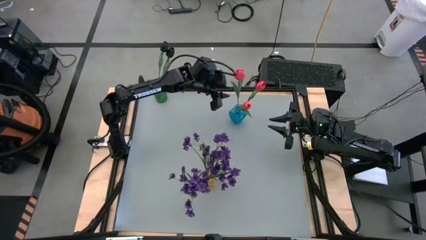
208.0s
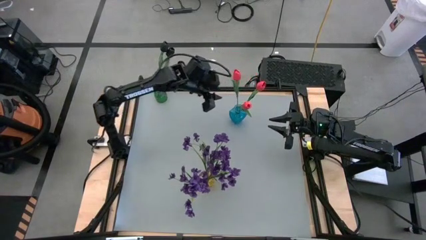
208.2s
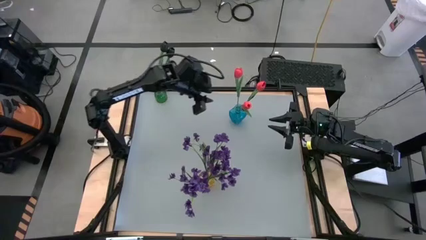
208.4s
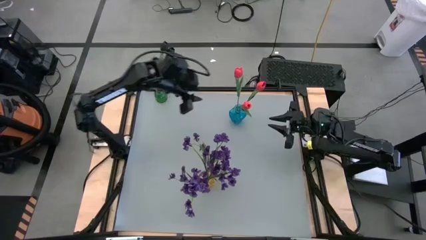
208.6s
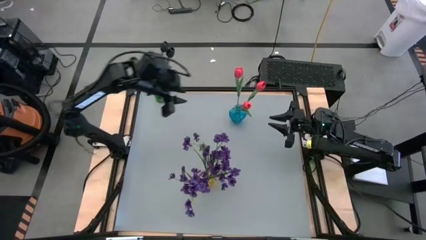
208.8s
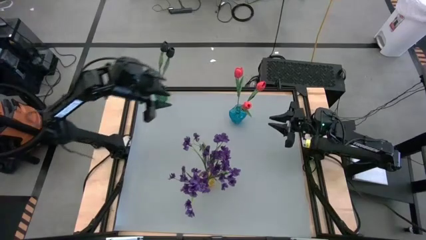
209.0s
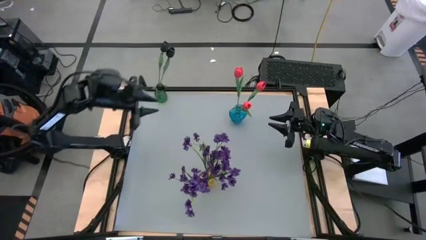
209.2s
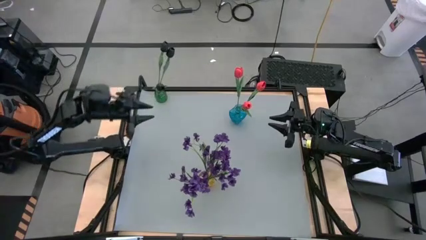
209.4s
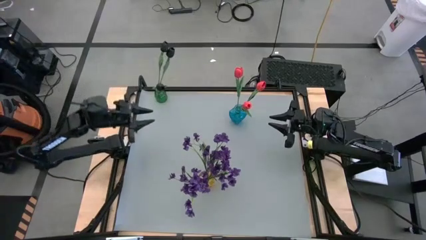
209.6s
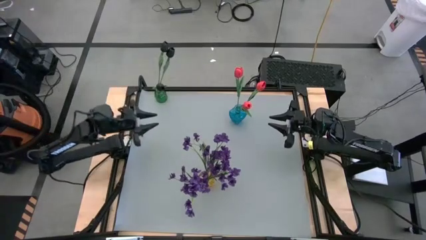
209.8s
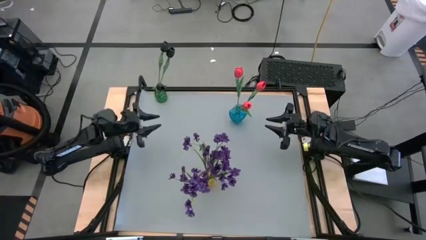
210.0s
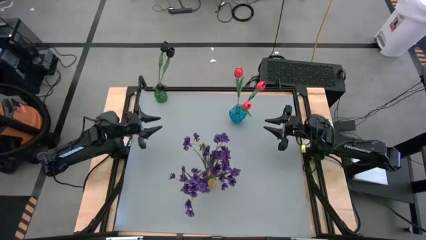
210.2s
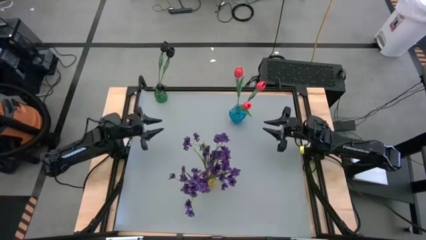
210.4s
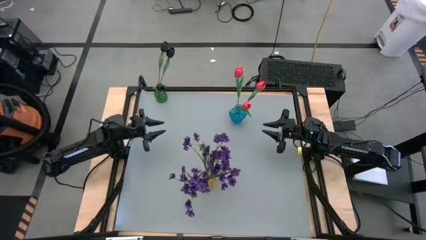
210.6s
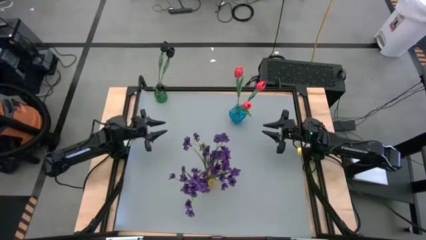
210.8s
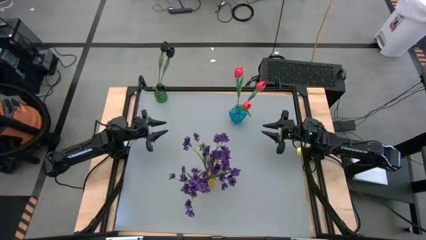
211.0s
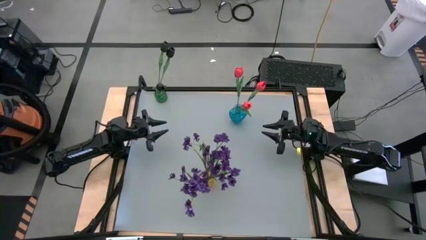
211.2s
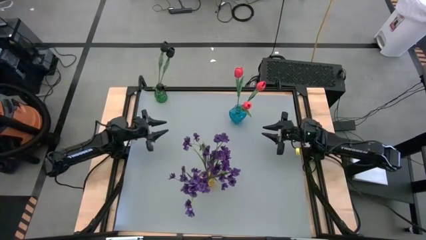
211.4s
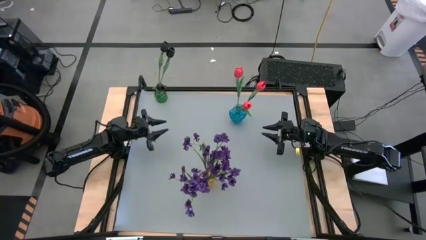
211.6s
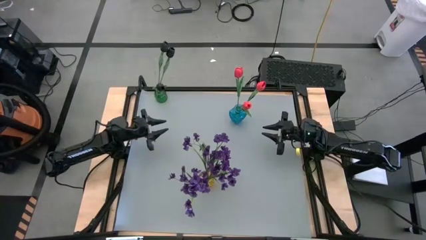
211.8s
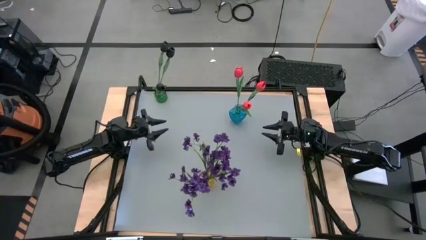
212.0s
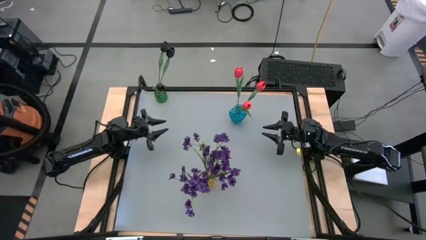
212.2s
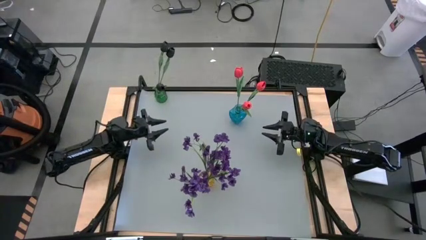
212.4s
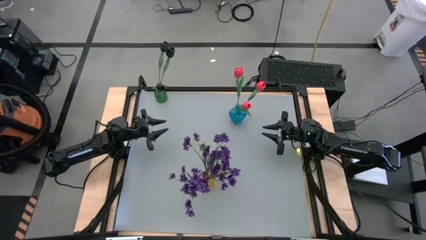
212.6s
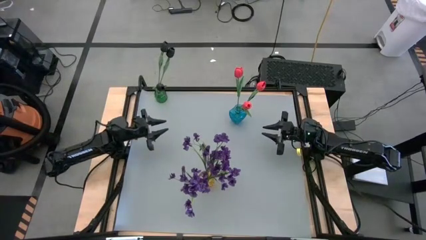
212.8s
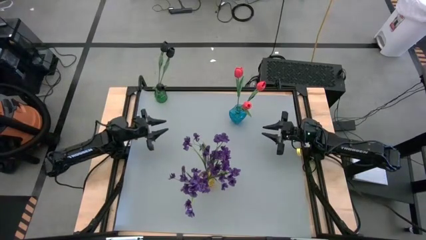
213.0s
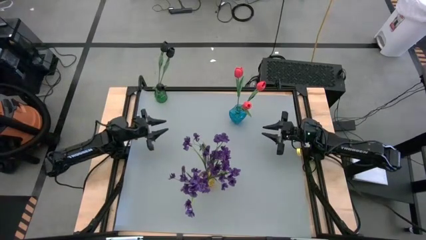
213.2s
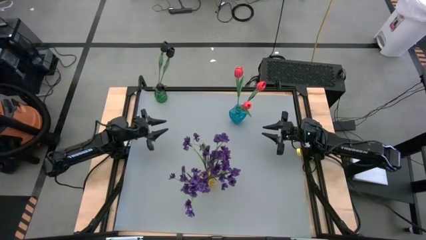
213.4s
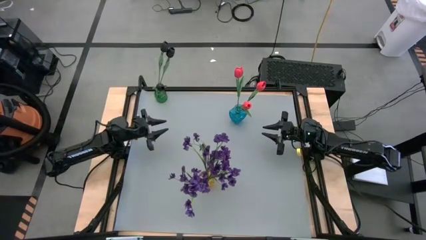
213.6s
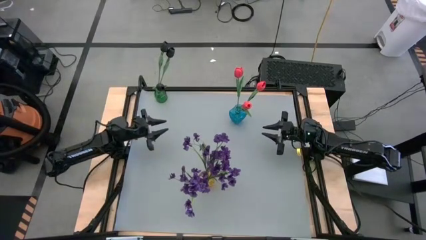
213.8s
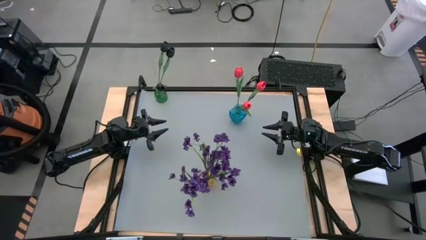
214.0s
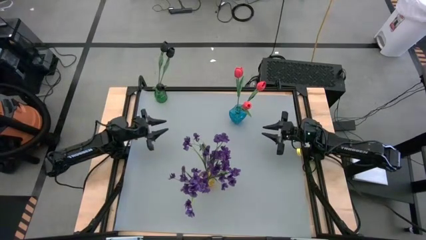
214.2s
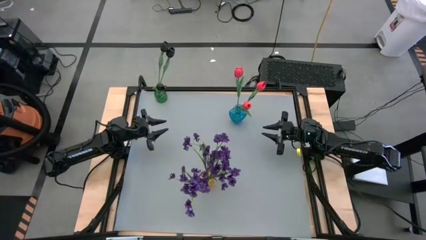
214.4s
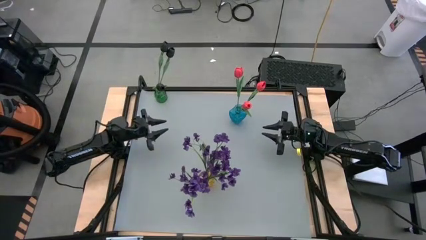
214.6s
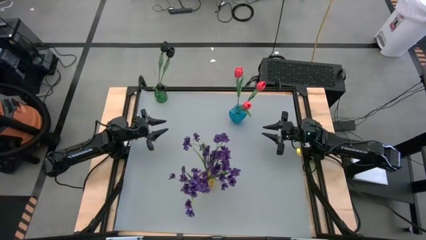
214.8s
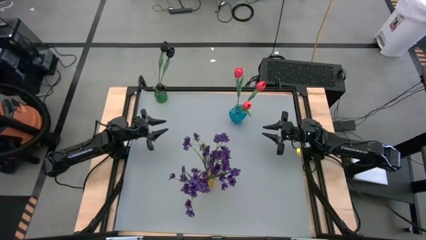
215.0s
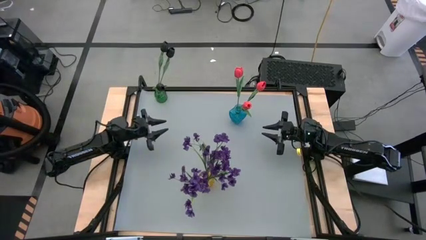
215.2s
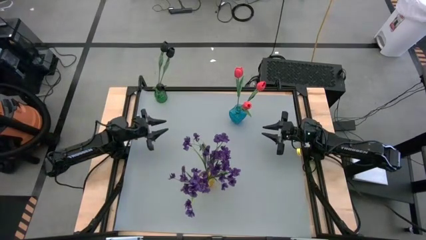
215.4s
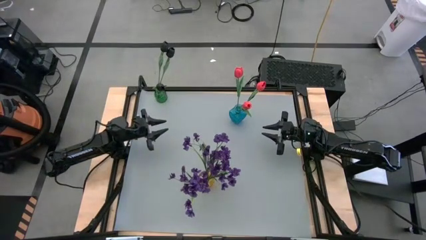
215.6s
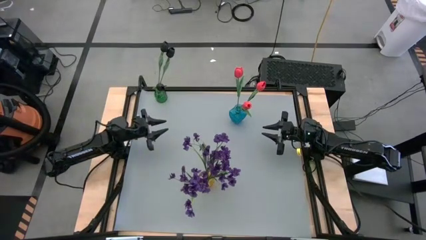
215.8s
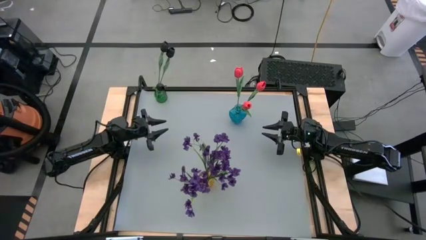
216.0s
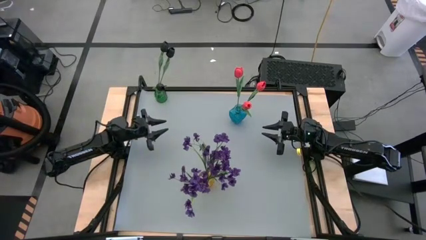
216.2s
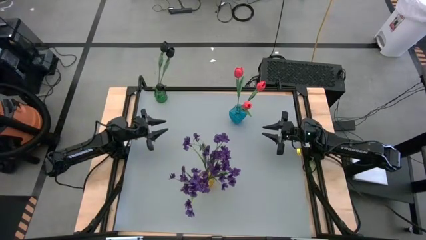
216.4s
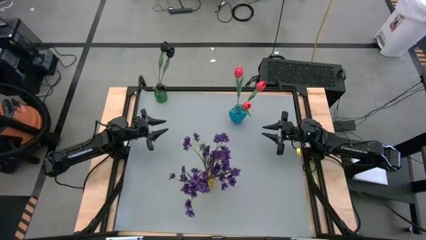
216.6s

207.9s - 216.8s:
Task: Sort flowers into vase by color
Return to Home Position

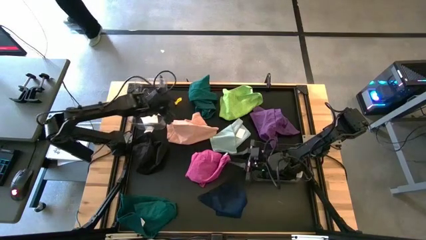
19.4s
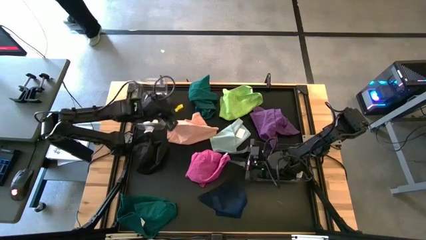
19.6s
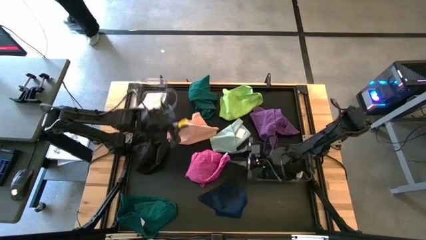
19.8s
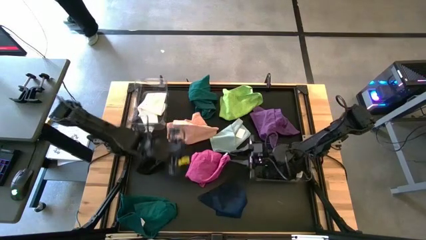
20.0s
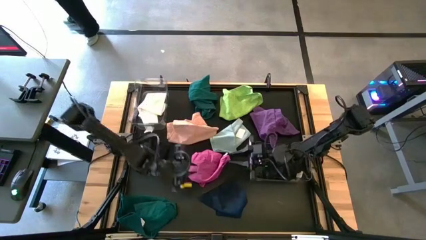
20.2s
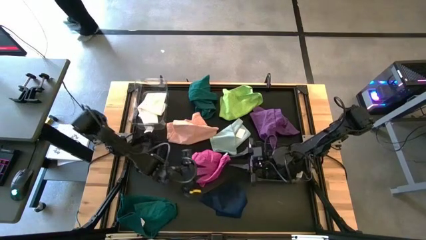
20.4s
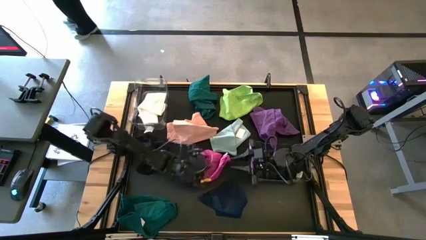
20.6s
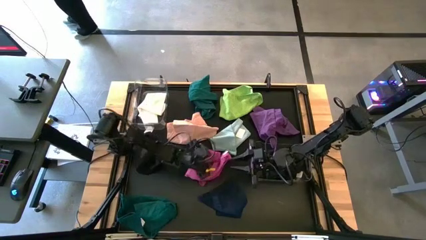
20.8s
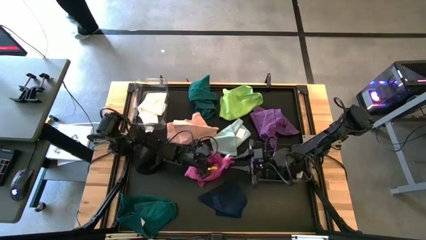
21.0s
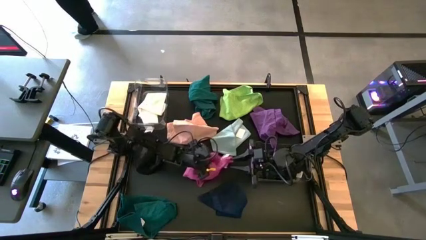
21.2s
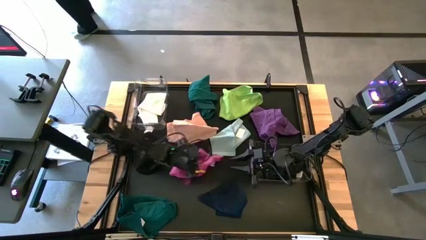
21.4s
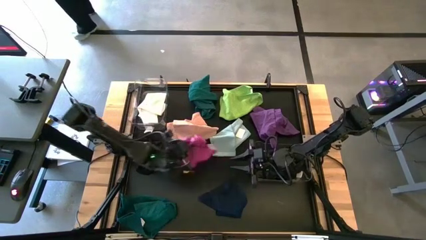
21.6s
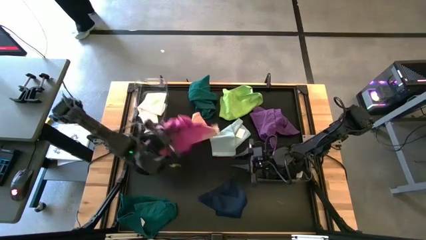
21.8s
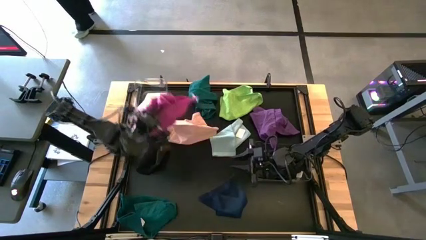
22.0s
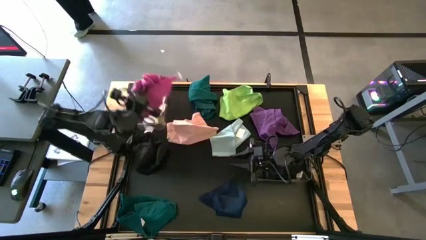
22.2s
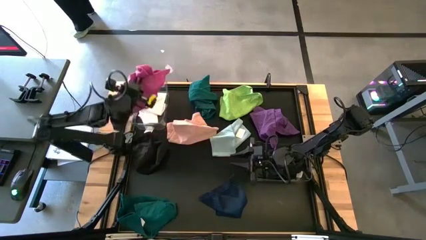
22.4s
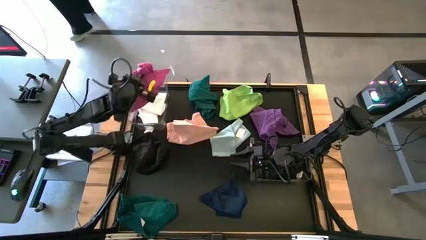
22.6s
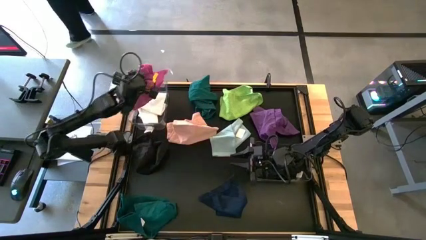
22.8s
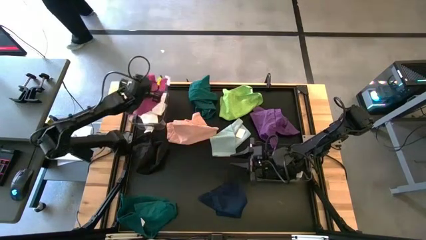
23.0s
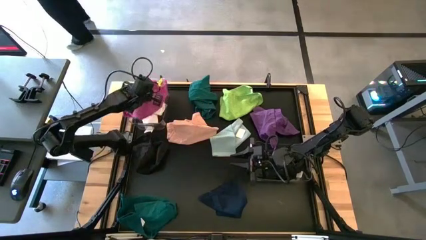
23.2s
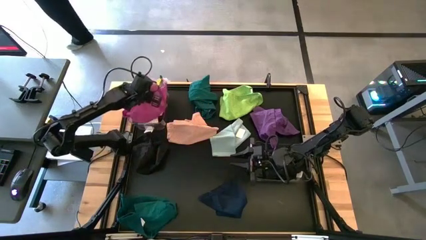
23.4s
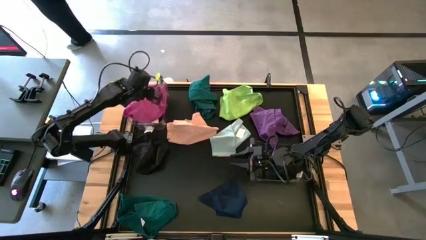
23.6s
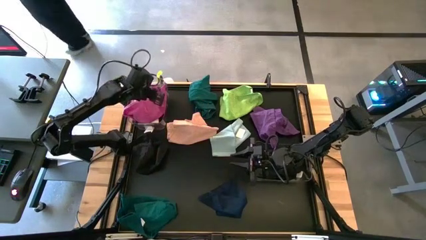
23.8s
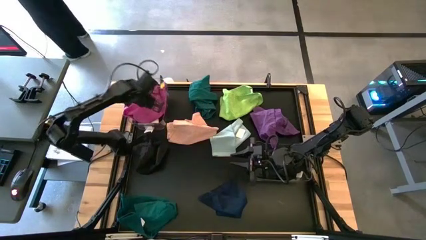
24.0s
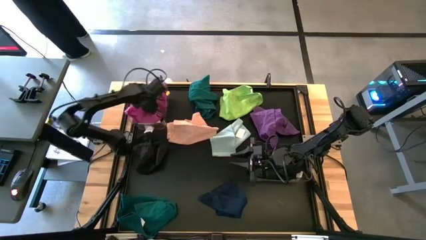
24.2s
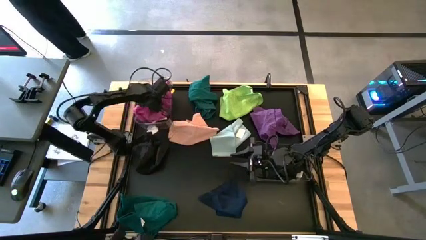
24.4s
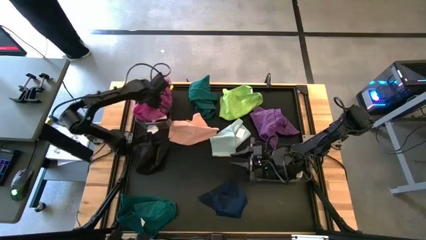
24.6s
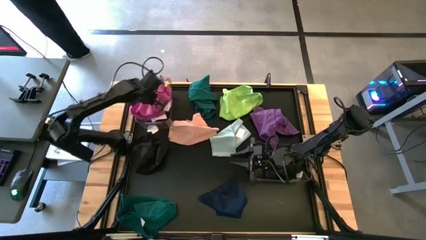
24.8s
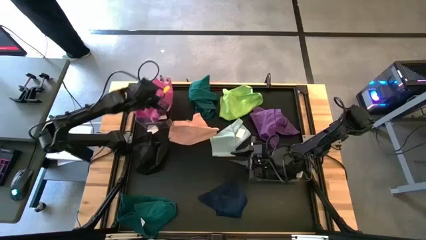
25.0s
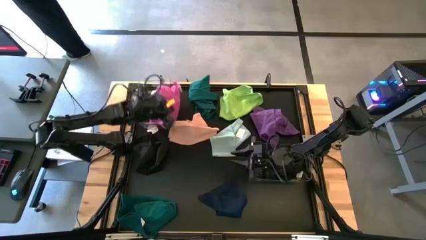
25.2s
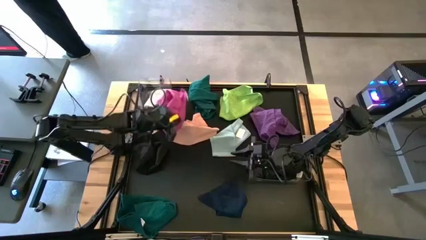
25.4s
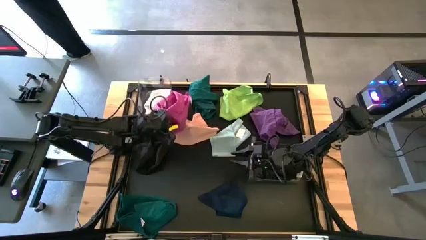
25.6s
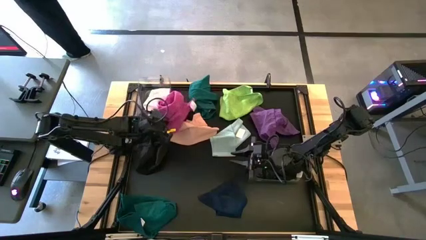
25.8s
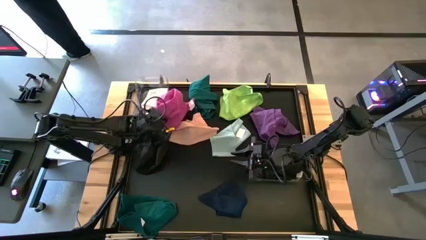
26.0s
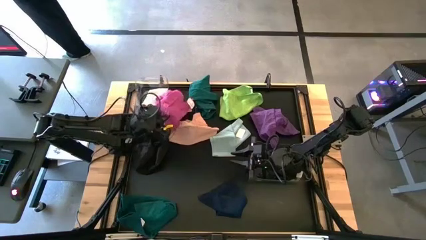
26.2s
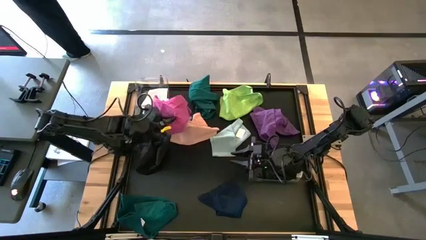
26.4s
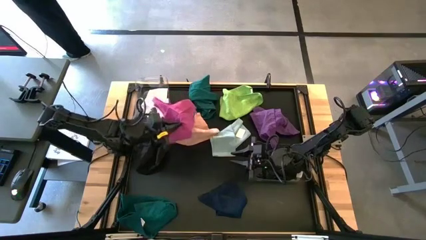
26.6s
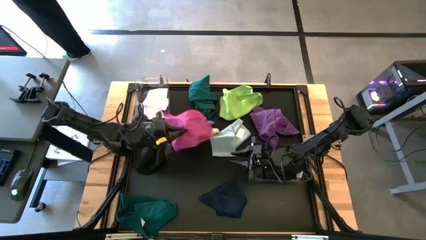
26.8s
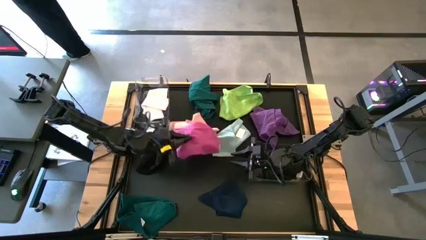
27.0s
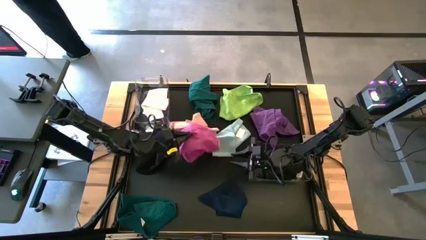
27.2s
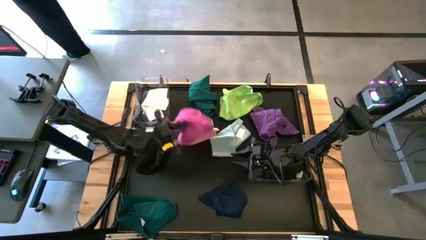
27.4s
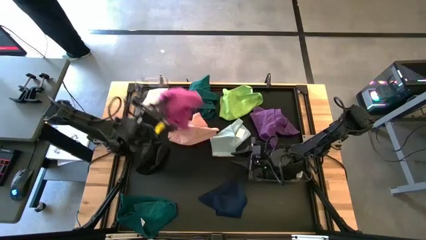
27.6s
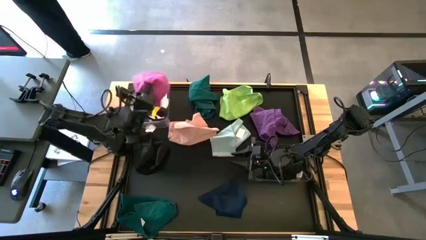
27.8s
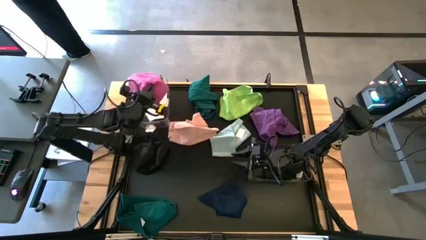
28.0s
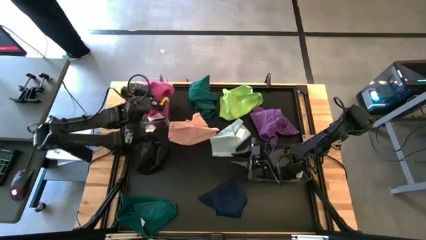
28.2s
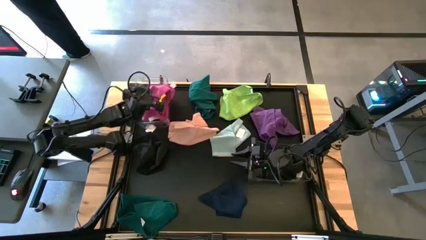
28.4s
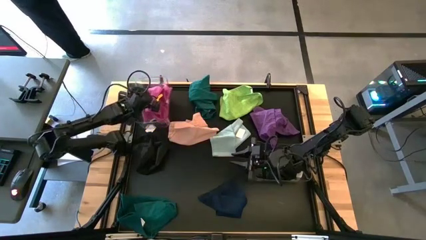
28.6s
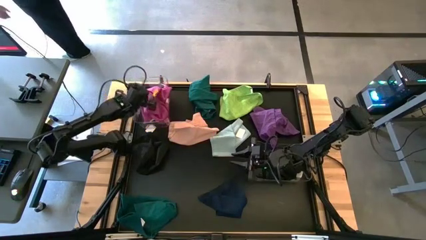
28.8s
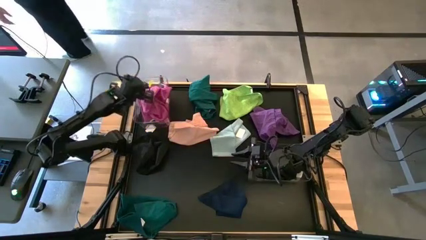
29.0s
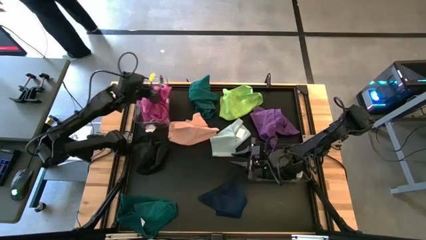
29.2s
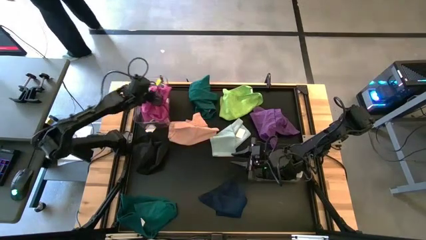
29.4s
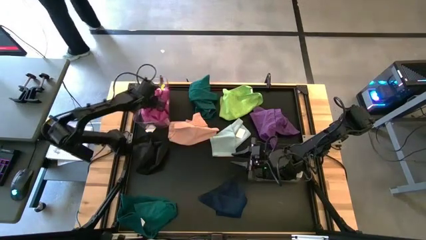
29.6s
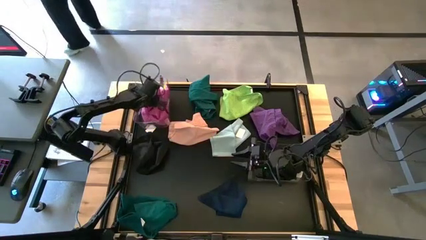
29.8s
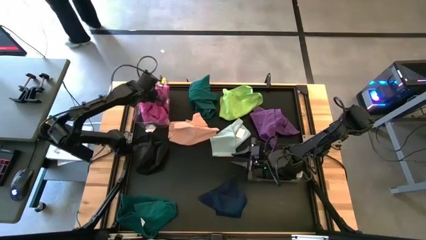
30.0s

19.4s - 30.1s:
Task: Sort towels by color in basket
Put the pink towel into the left transparent bin
